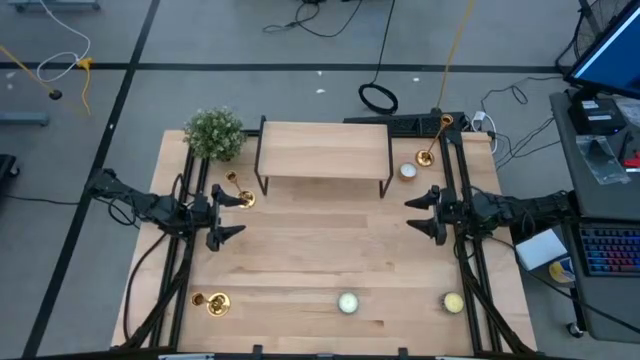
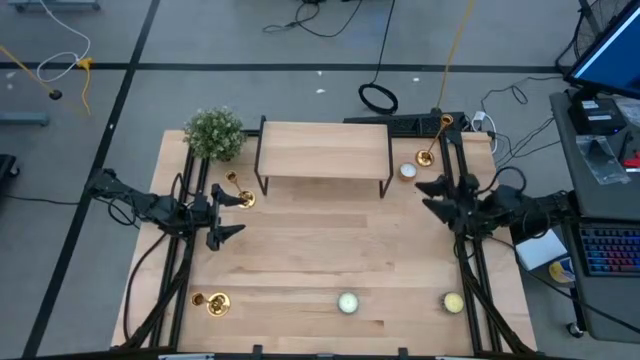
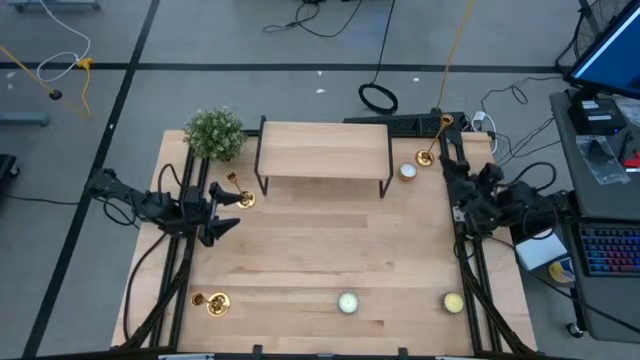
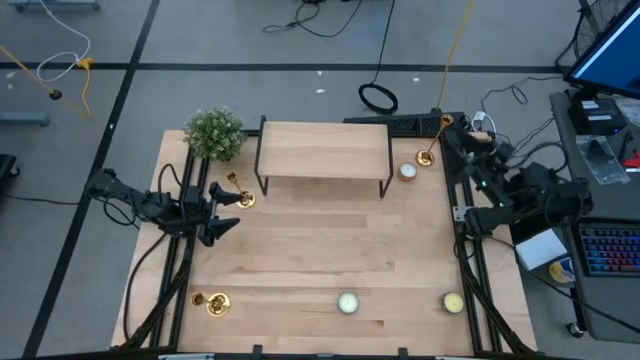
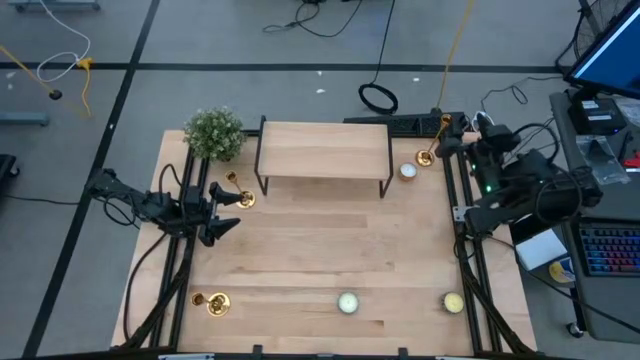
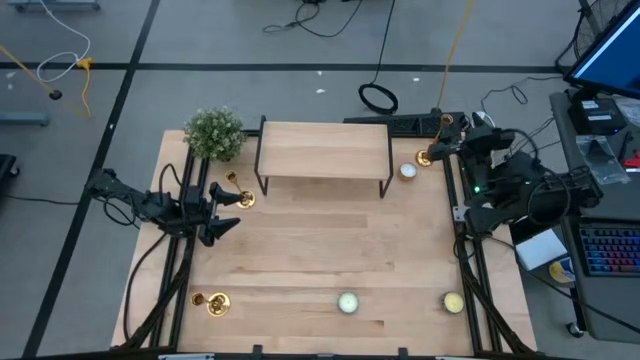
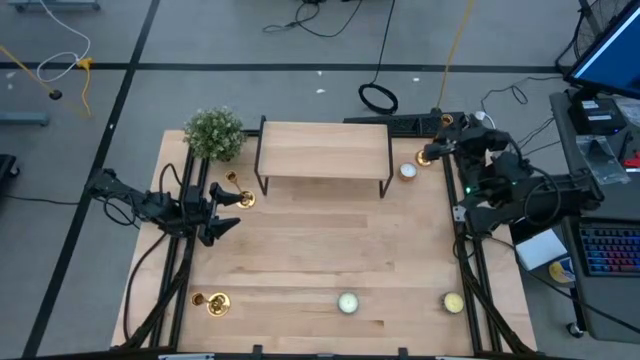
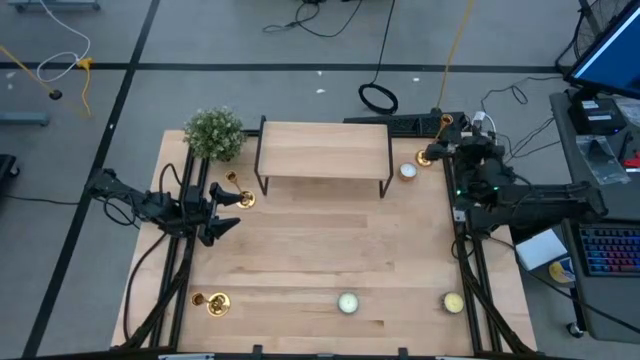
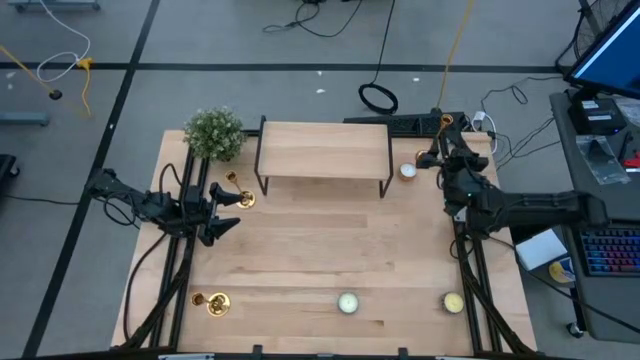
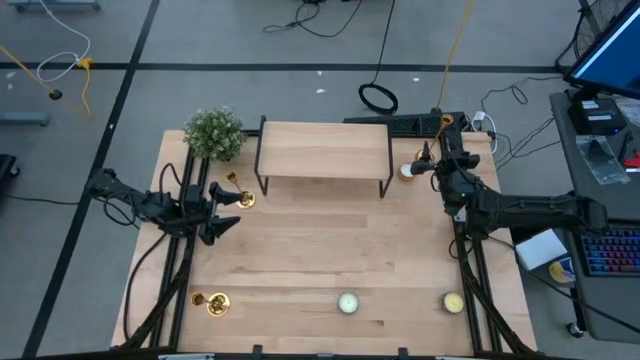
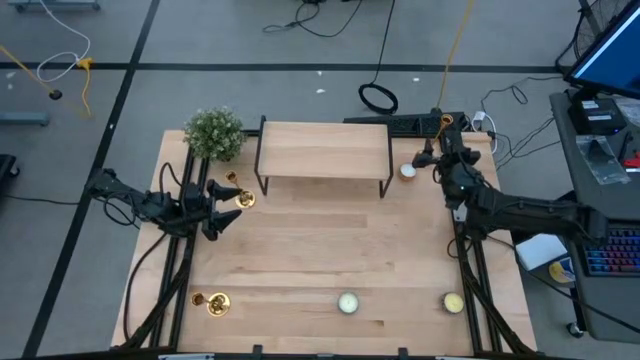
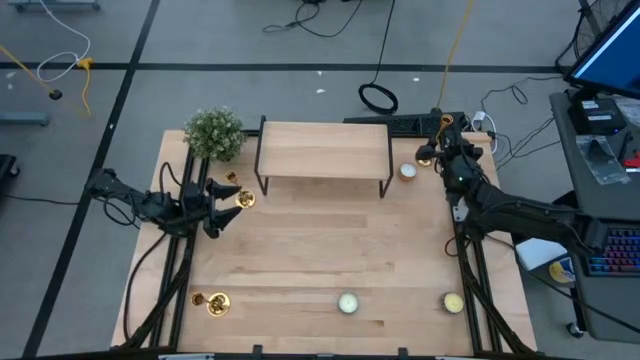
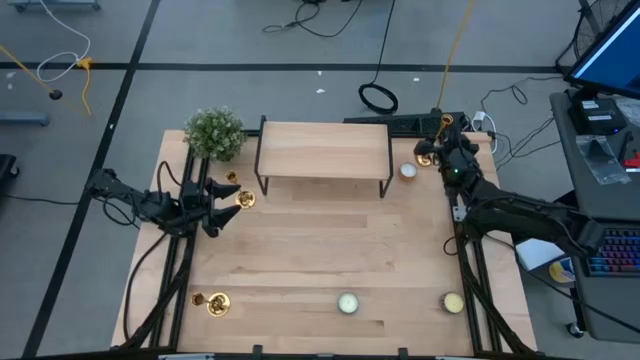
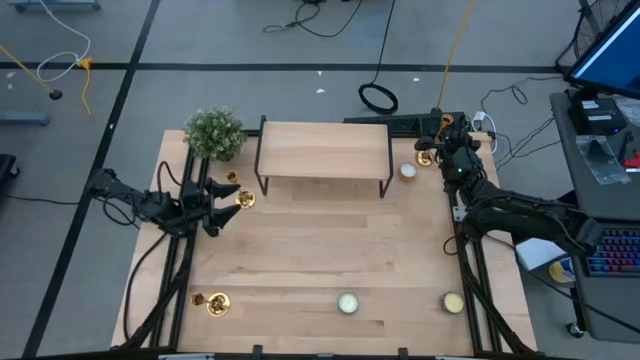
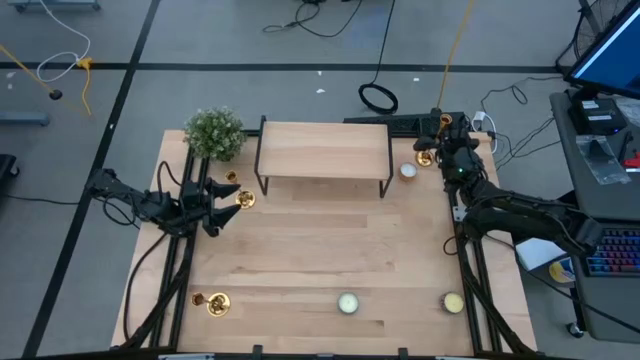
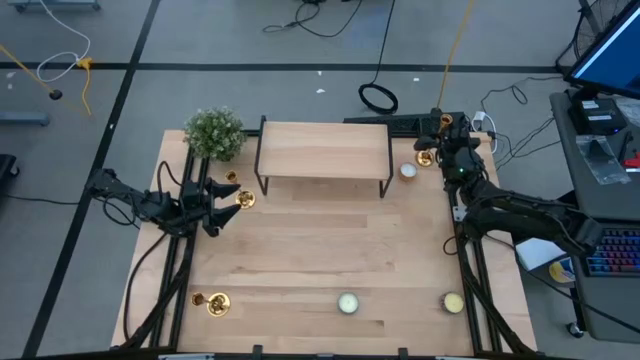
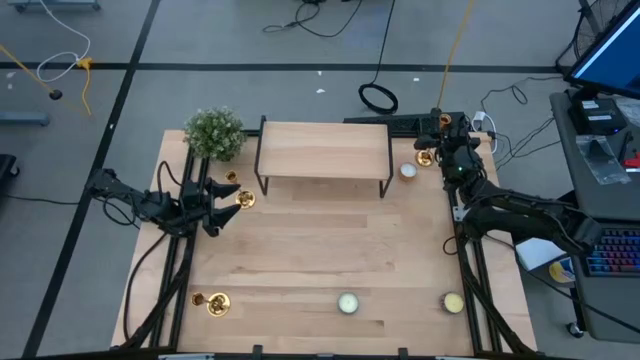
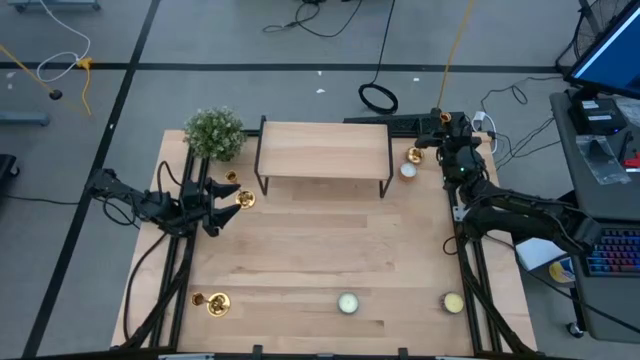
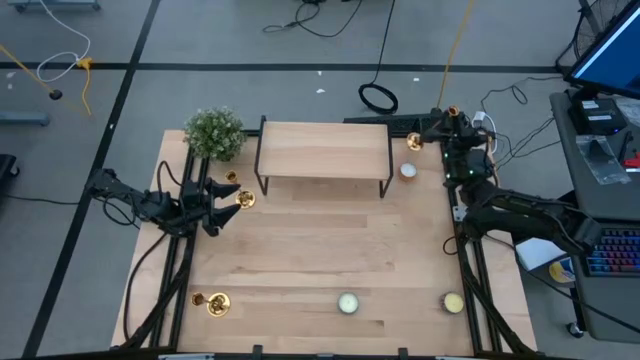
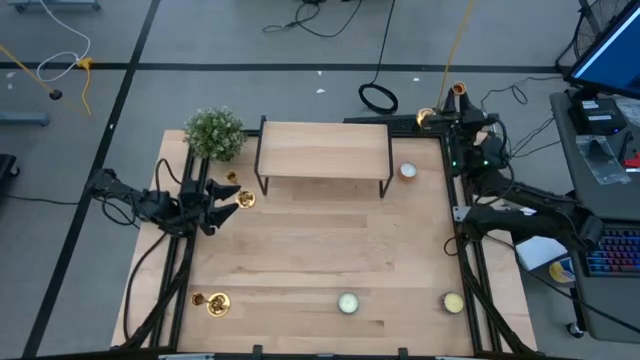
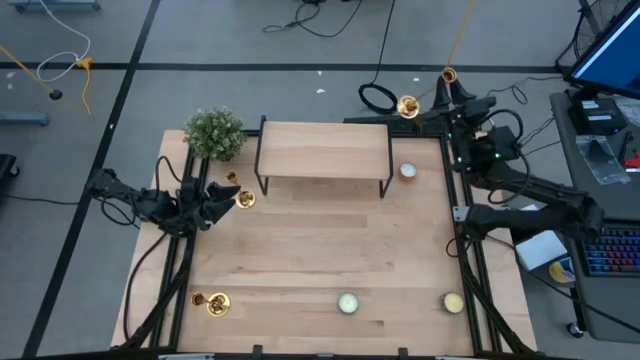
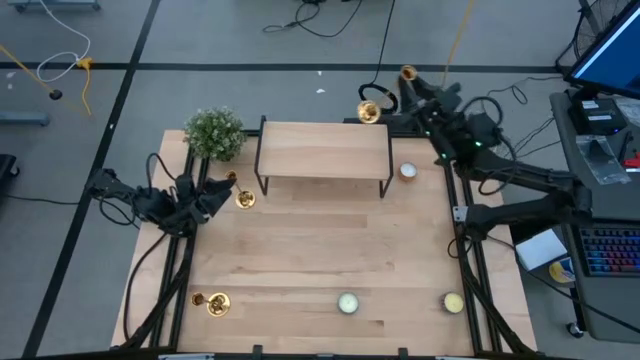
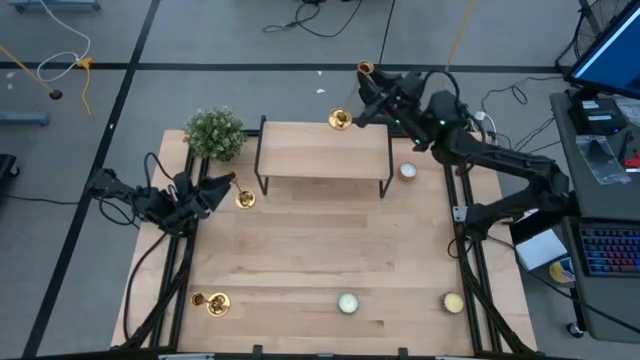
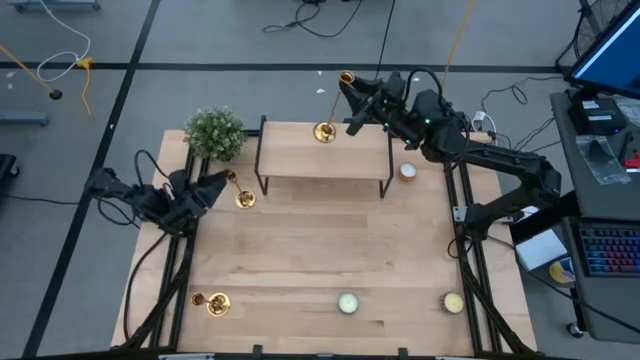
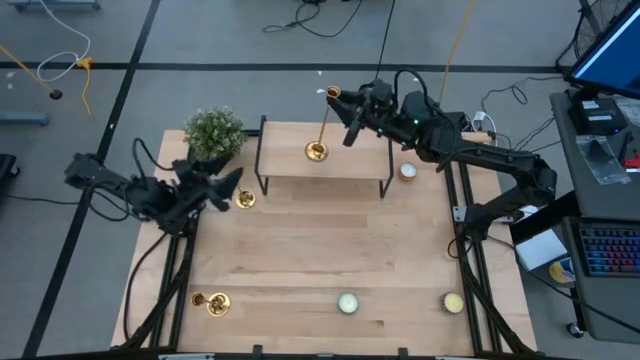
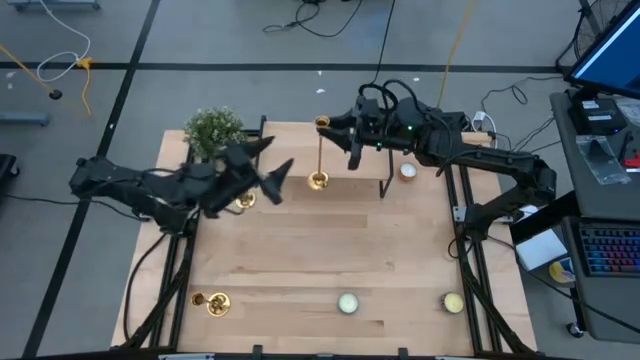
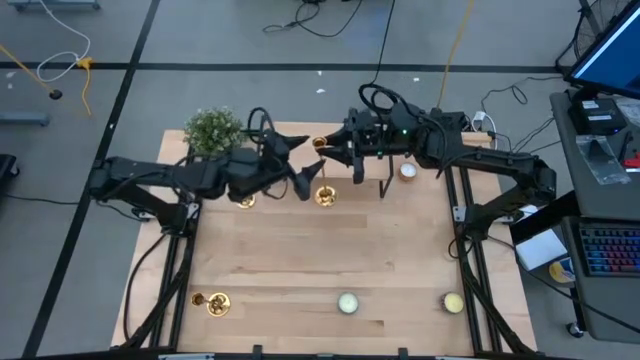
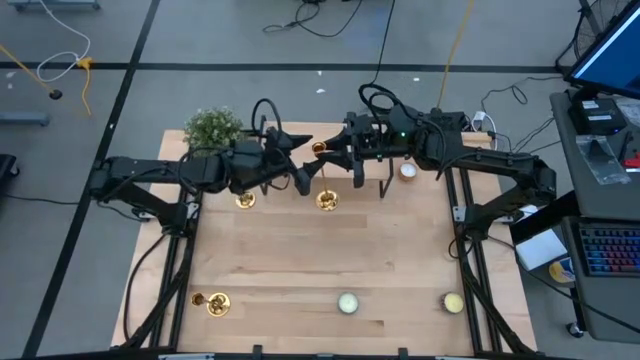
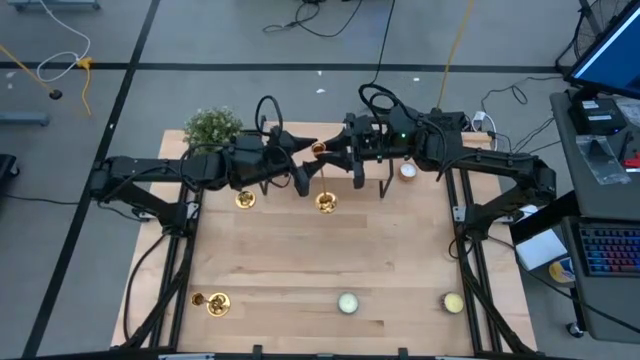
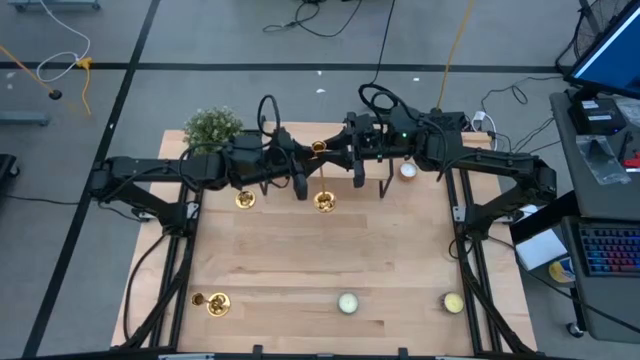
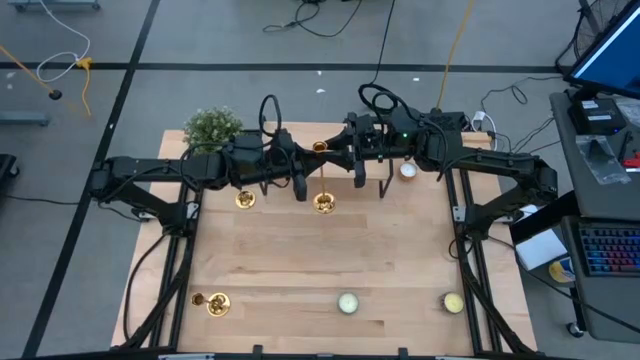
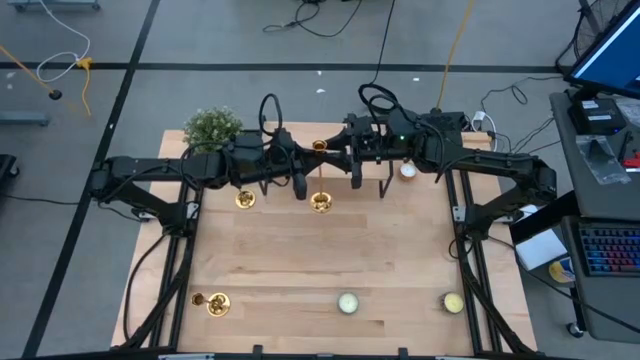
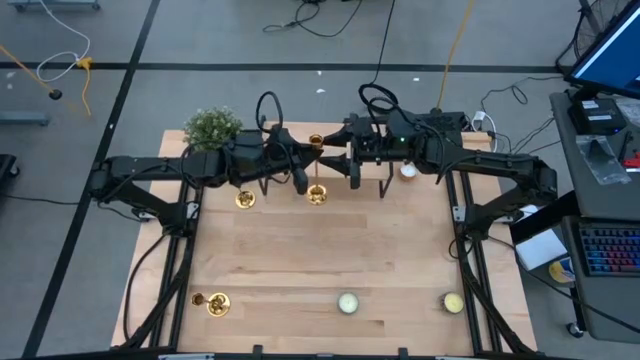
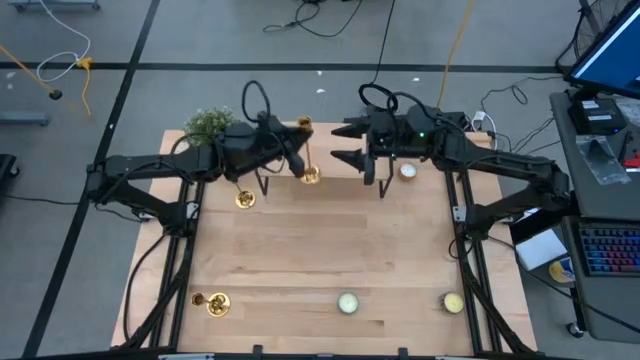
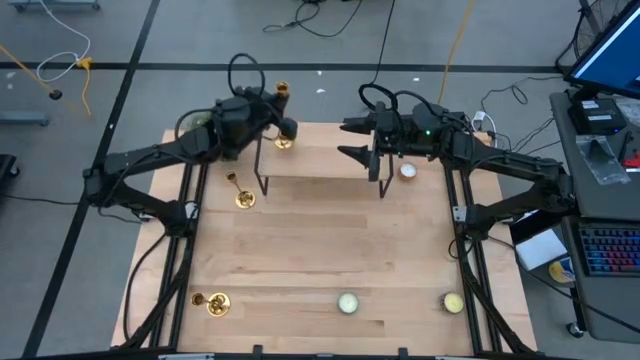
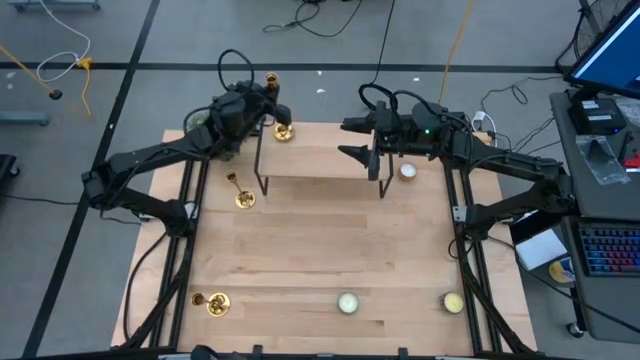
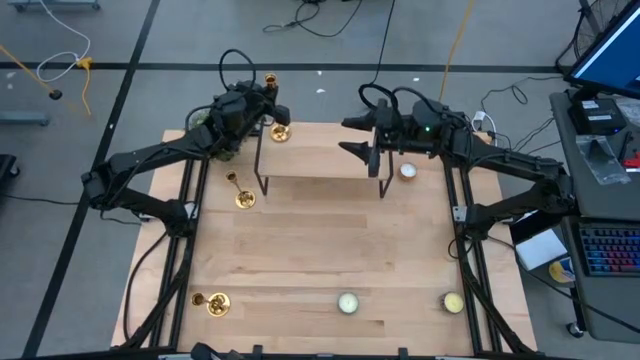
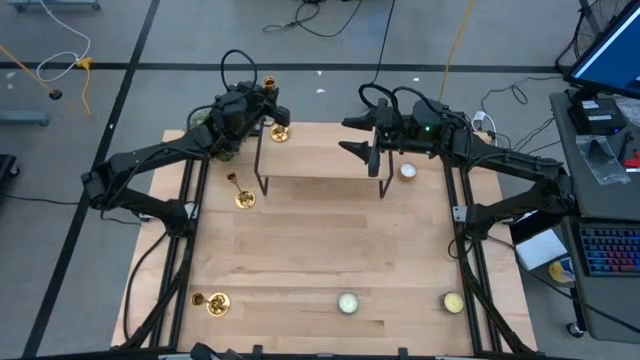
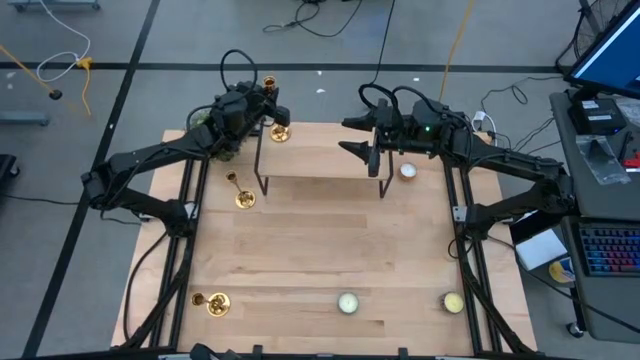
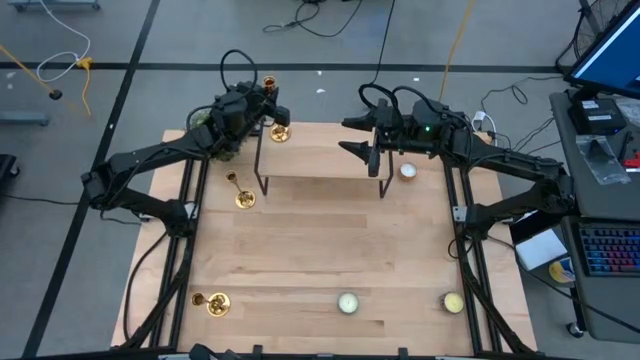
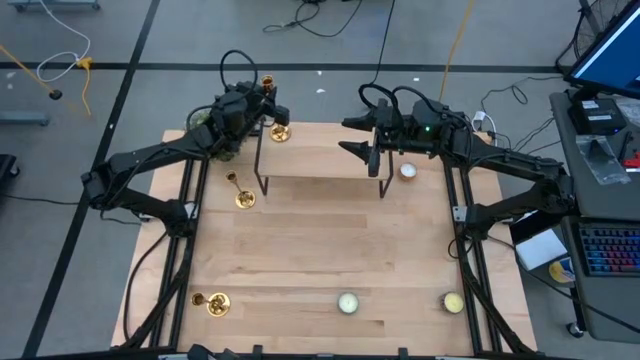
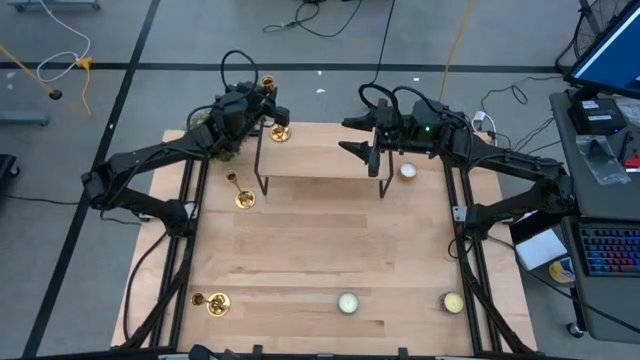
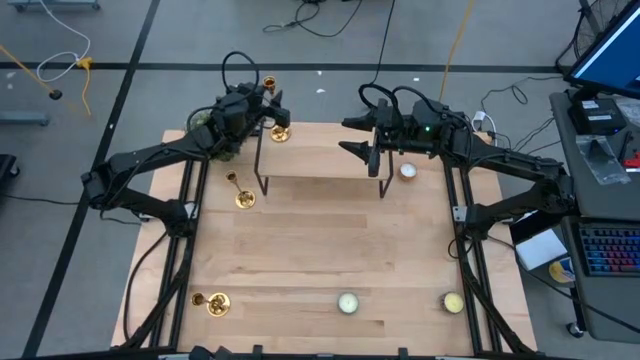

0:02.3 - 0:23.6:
Task: Pick & Place candle stick holders
Put the top right gold candle holder on the shelf
